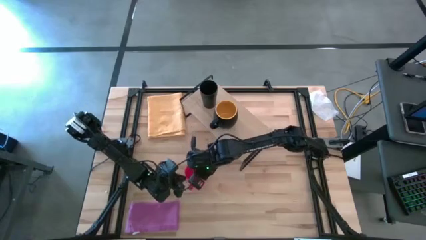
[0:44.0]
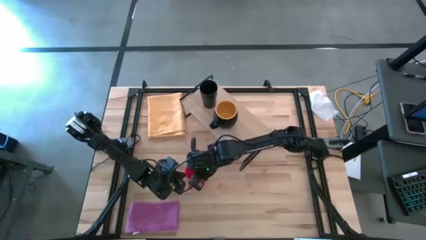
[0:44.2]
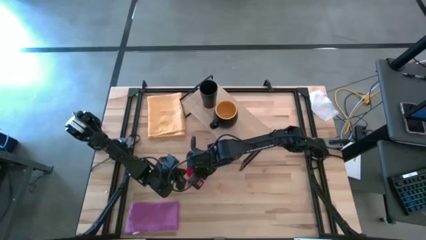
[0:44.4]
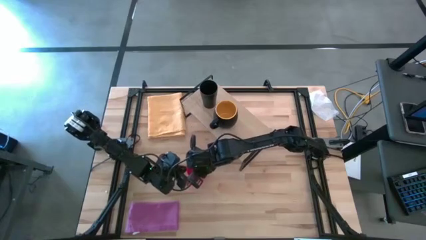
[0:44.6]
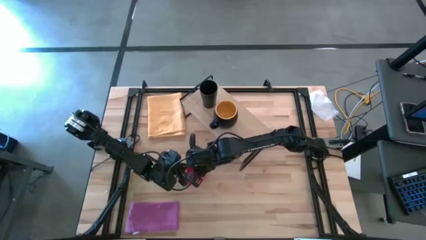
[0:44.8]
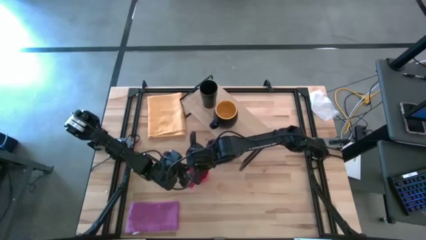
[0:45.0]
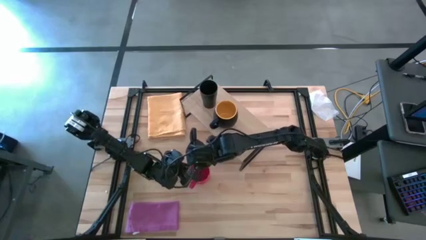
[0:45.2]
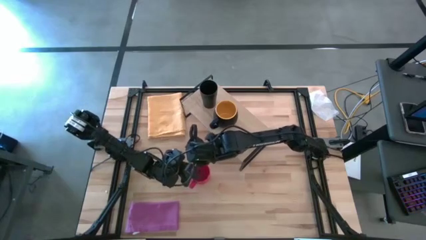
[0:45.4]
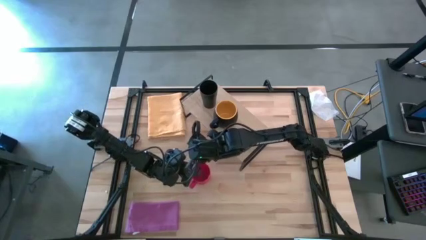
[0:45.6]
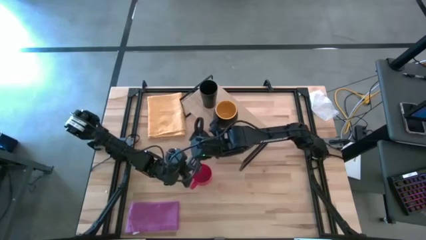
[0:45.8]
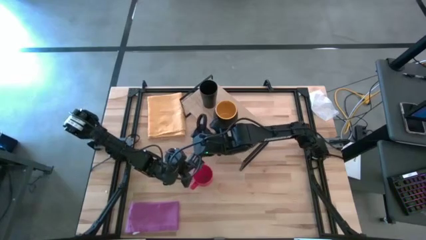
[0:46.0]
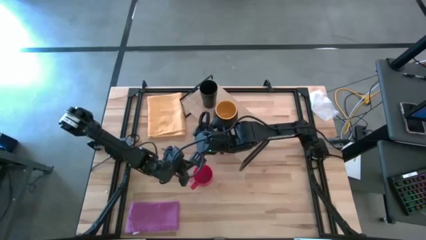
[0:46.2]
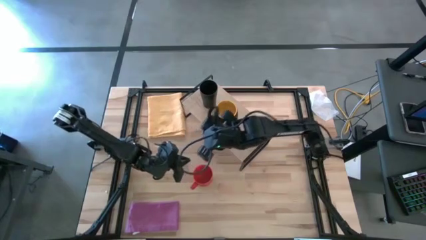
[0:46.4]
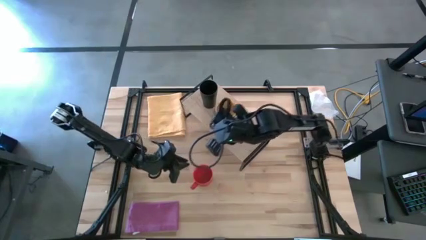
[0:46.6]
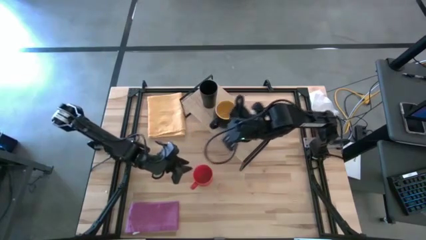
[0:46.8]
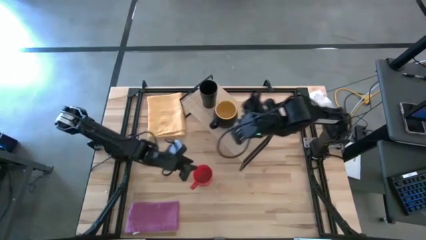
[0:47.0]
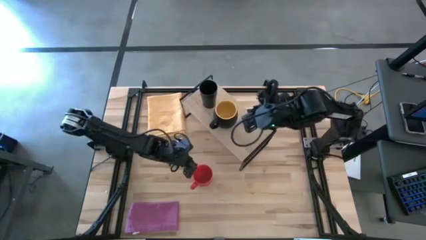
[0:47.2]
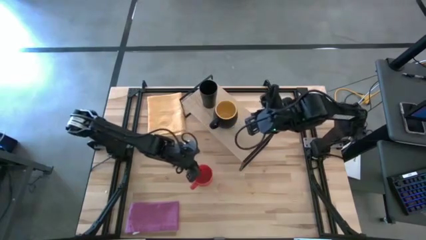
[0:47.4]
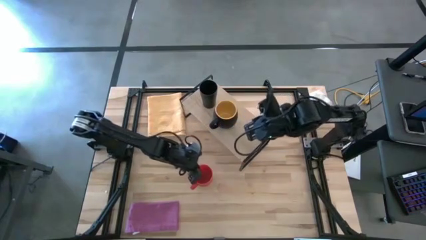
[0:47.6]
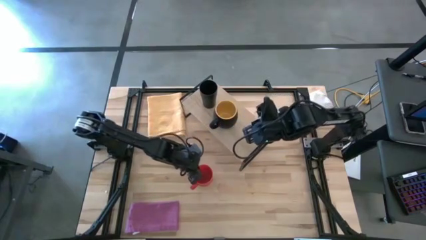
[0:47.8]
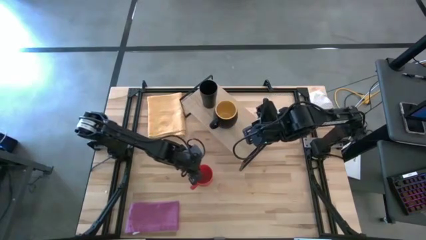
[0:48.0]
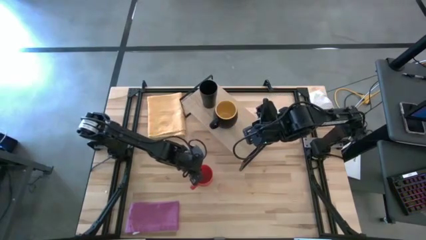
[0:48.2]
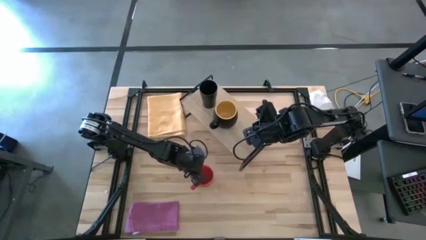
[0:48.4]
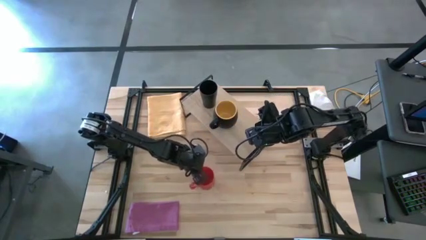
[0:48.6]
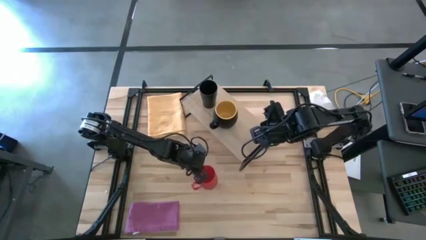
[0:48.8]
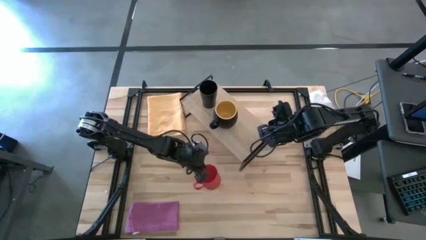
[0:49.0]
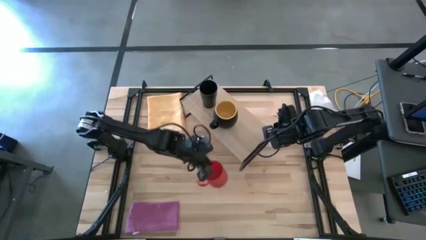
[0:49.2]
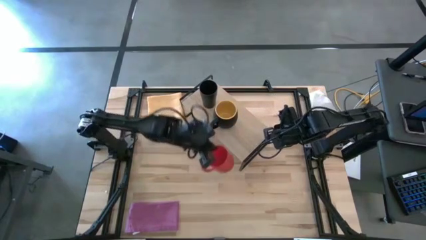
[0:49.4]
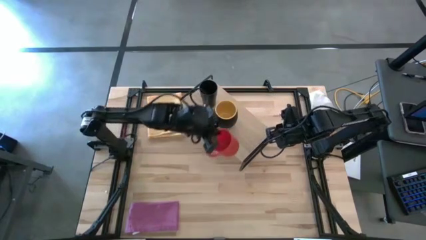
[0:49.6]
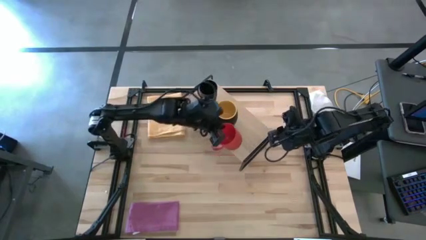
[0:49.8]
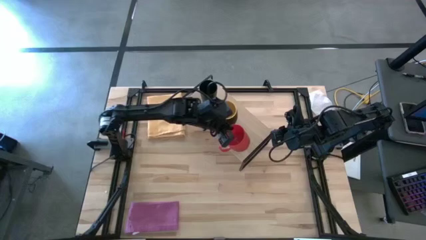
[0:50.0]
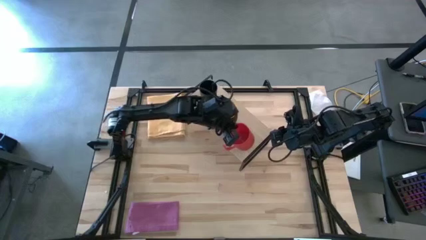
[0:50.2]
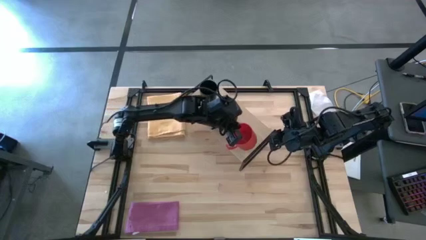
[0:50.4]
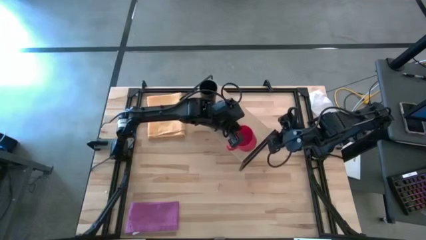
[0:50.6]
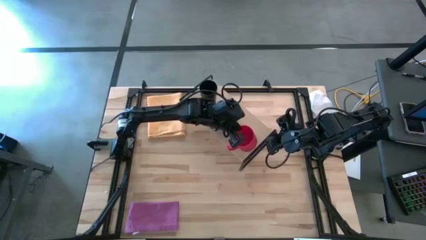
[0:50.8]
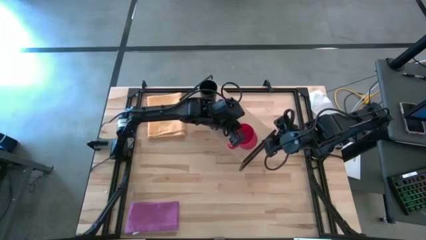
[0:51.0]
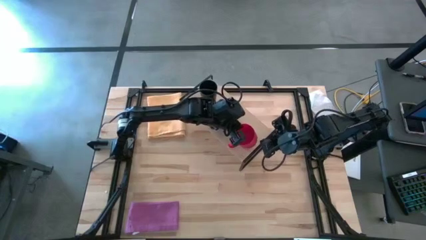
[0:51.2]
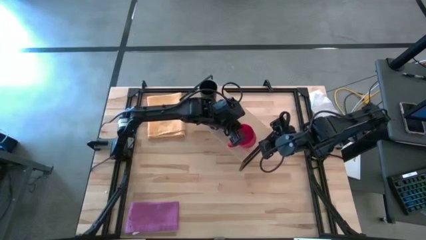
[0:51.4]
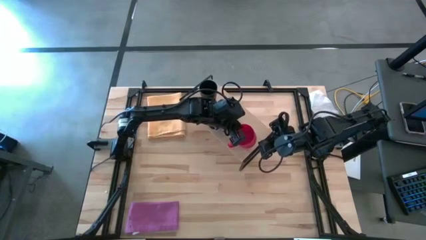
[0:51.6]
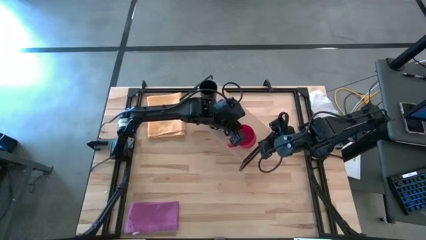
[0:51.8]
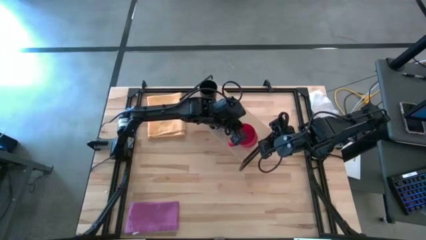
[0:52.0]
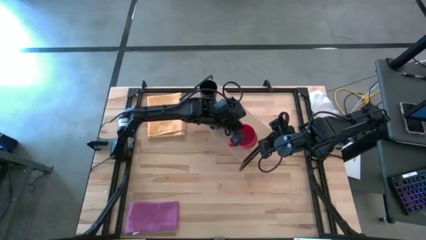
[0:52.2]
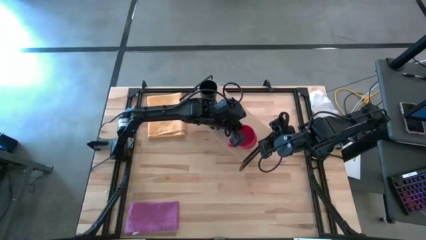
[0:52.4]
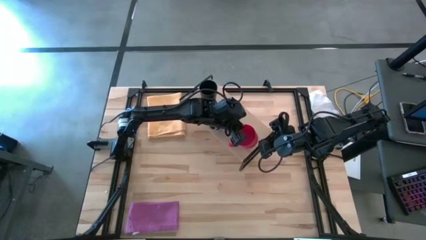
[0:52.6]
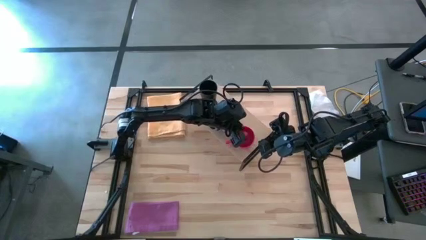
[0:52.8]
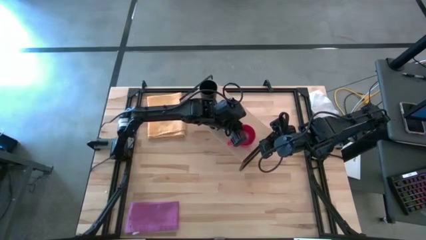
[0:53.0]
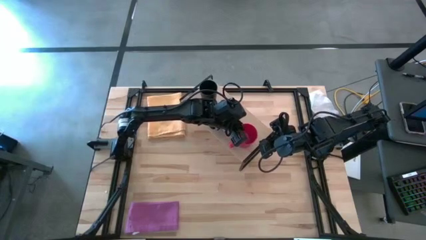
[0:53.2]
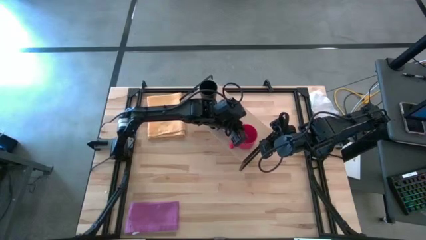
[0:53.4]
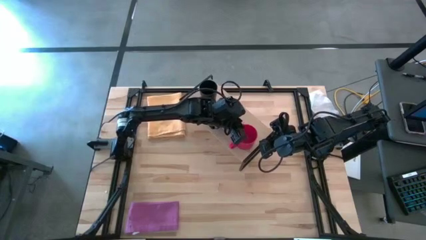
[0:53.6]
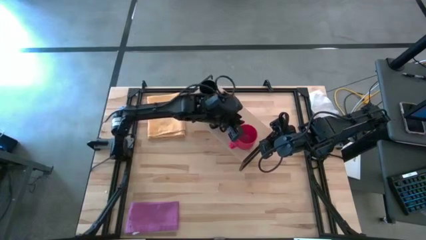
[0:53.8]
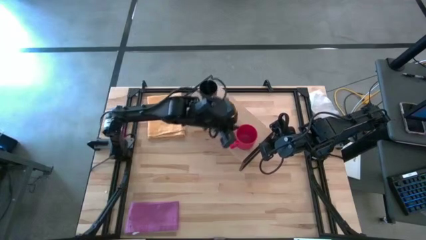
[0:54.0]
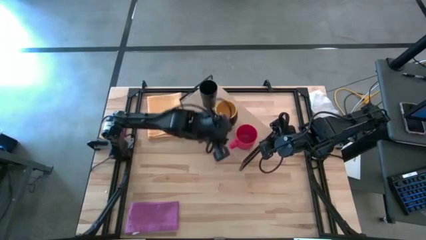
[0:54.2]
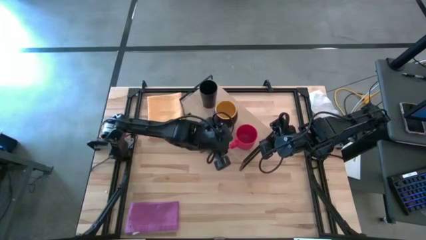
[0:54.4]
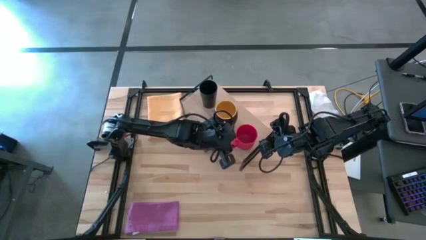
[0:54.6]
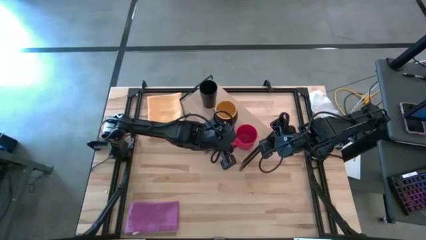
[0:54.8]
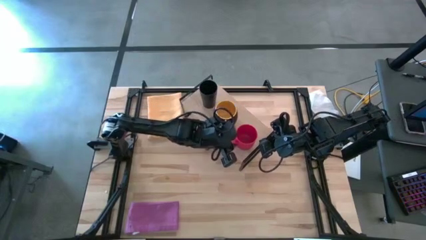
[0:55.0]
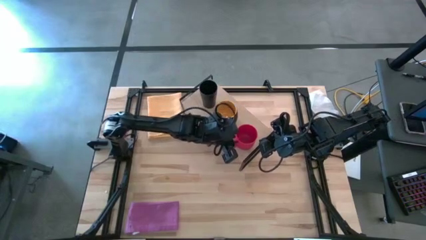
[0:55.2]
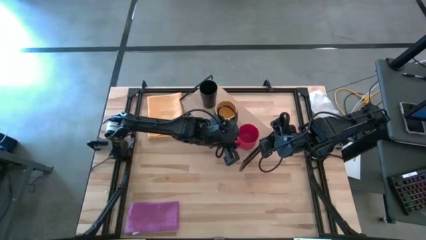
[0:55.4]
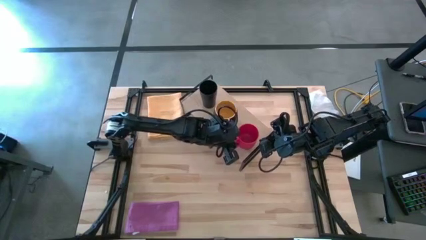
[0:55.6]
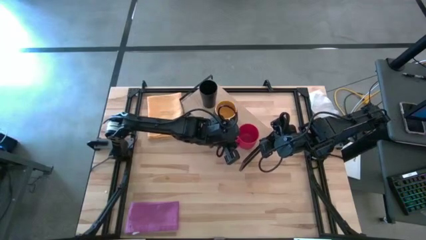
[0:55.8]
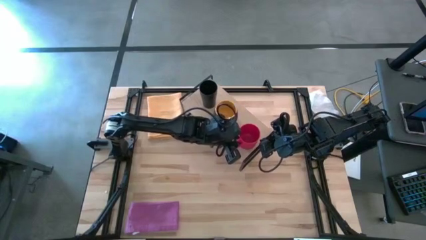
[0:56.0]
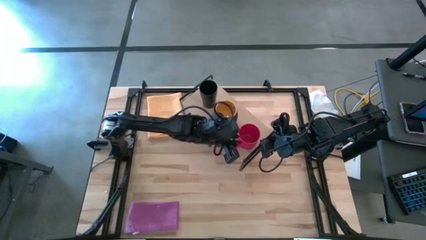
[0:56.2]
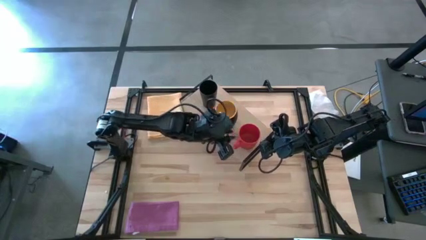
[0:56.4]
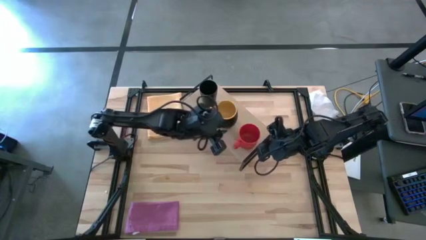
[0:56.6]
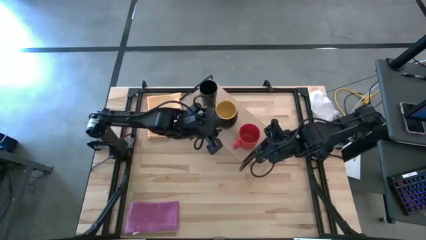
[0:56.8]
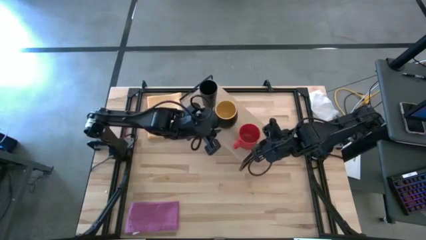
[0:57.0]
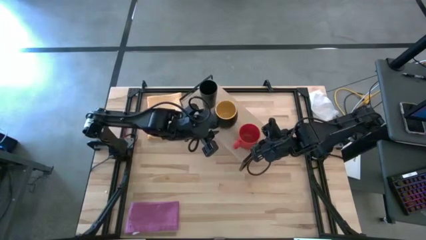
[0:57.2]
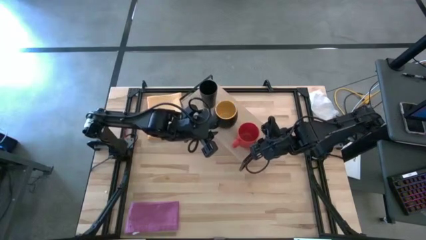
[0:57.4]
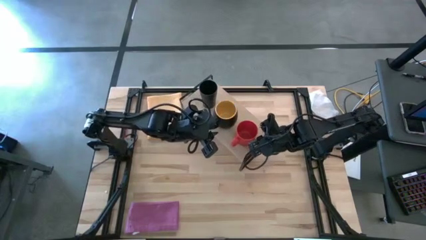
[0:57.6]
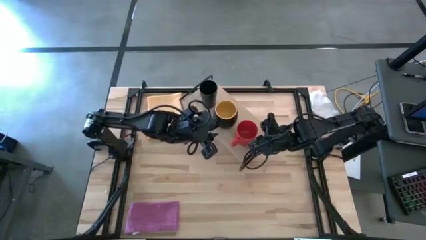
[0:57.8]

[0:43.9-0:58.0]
Task: Stack small to large cups/mugs on shelf
Put the red mug on the shelf
